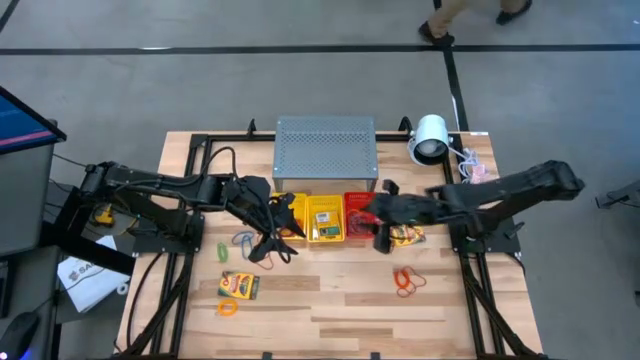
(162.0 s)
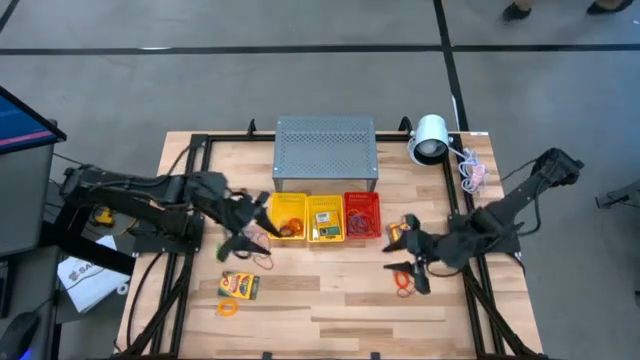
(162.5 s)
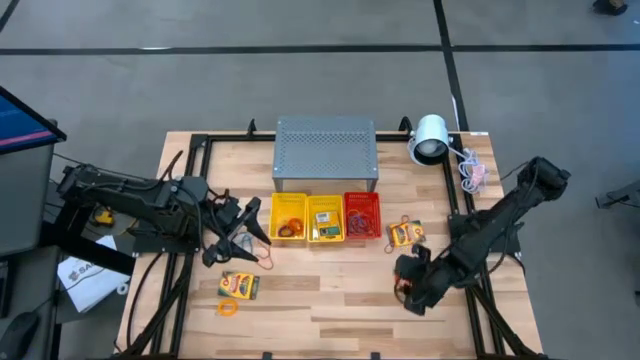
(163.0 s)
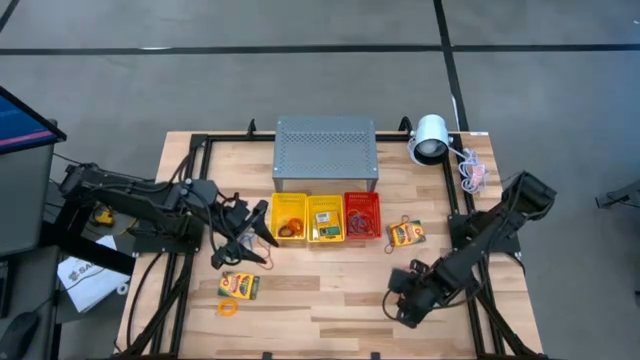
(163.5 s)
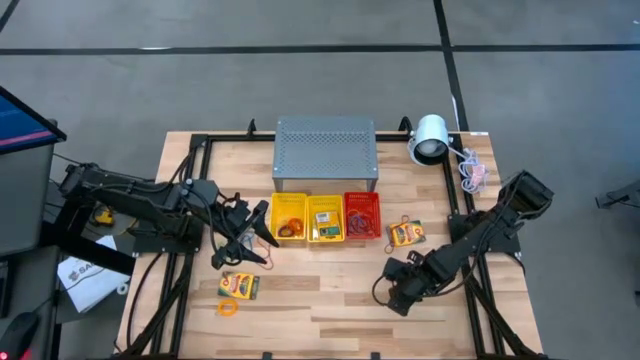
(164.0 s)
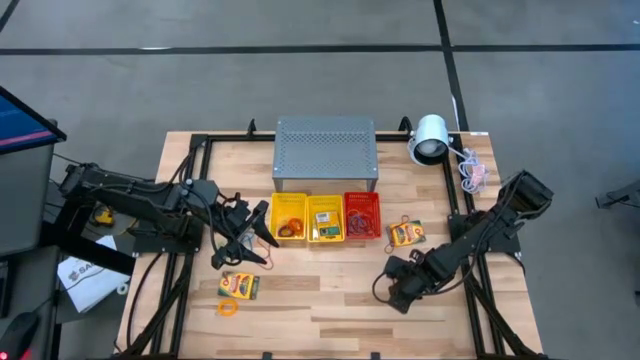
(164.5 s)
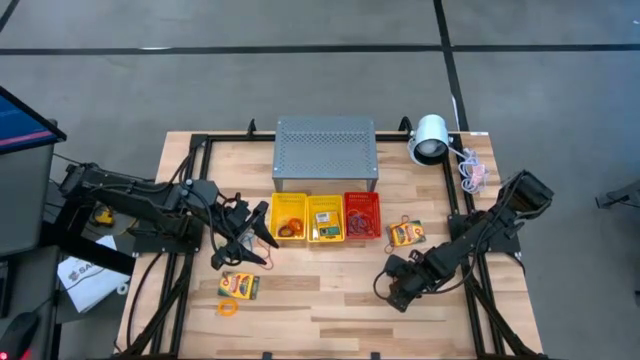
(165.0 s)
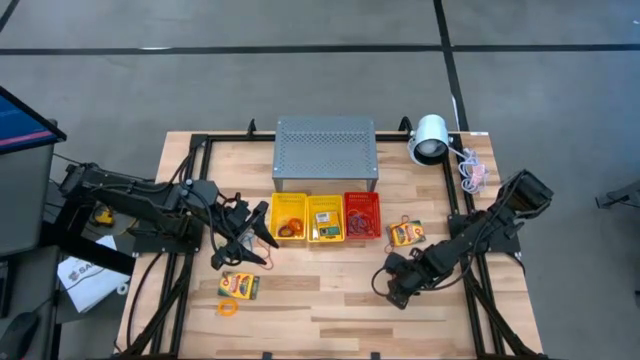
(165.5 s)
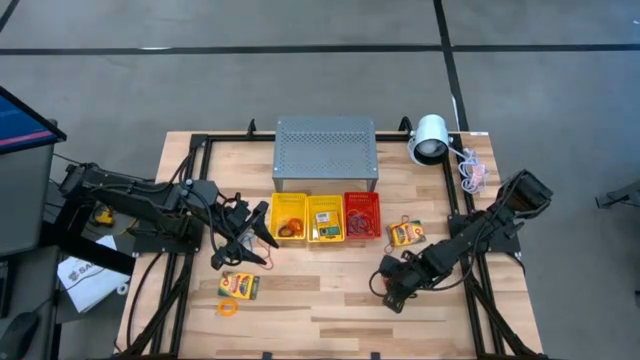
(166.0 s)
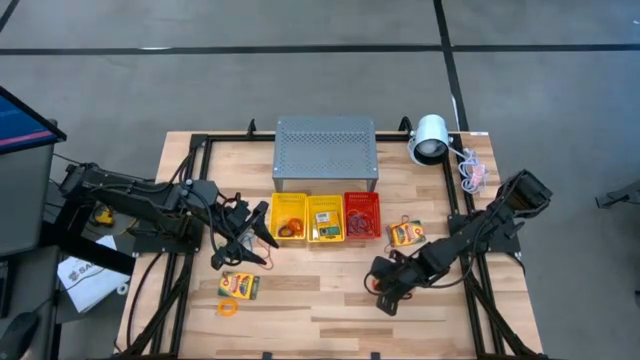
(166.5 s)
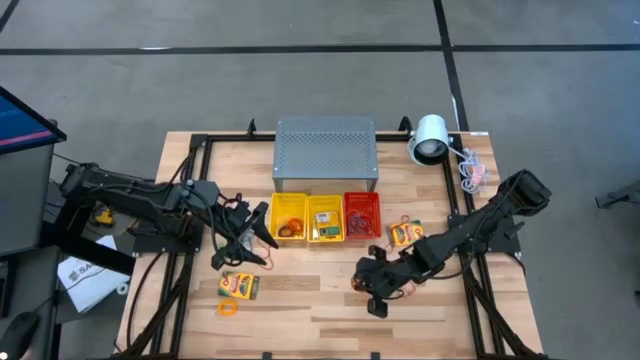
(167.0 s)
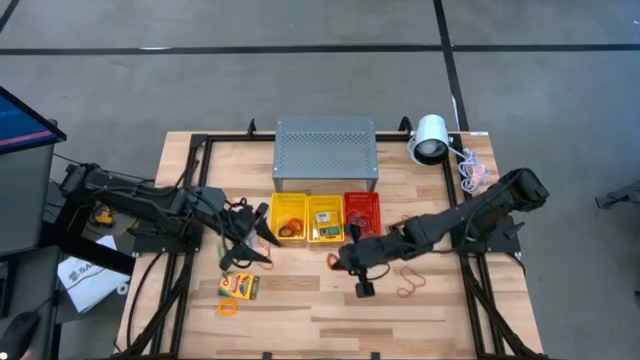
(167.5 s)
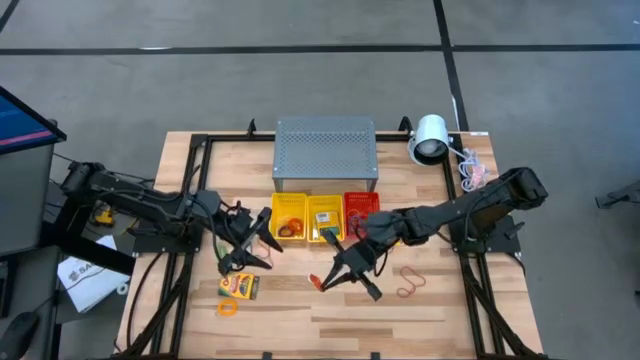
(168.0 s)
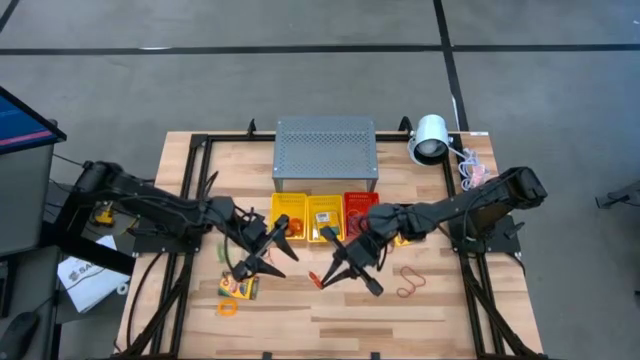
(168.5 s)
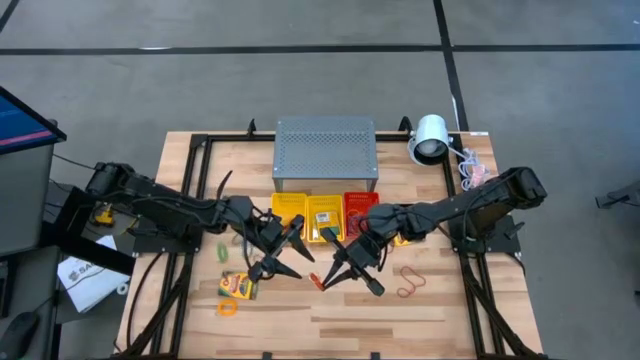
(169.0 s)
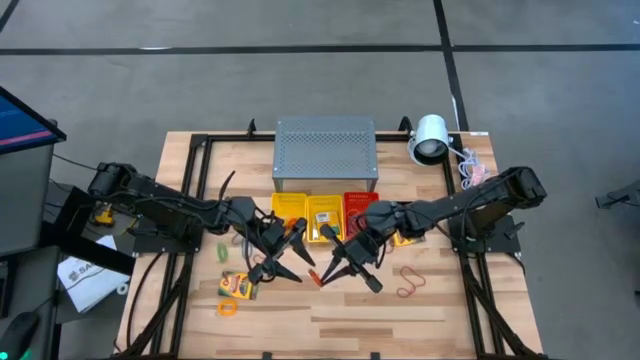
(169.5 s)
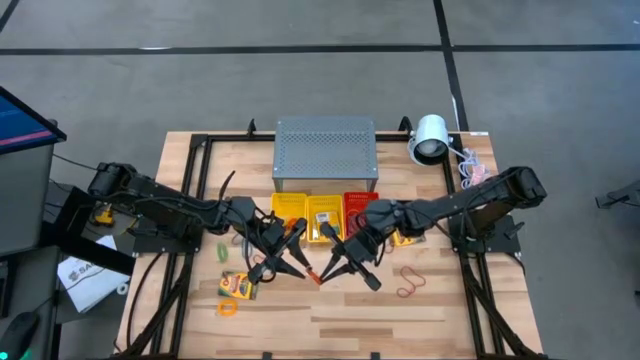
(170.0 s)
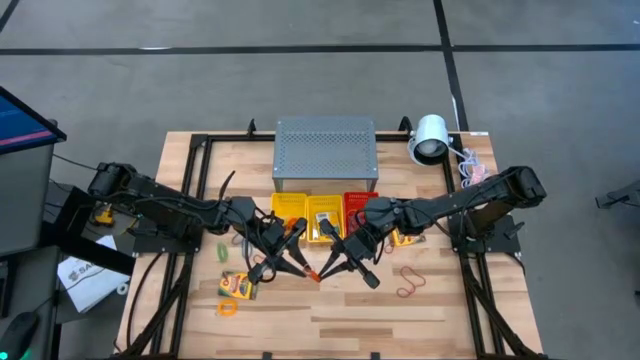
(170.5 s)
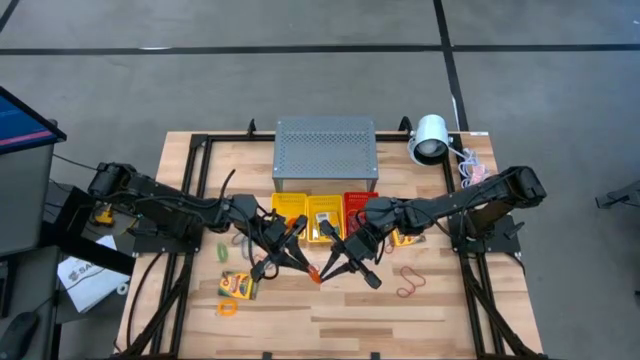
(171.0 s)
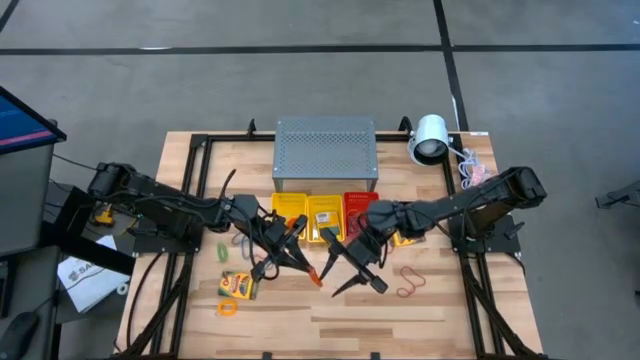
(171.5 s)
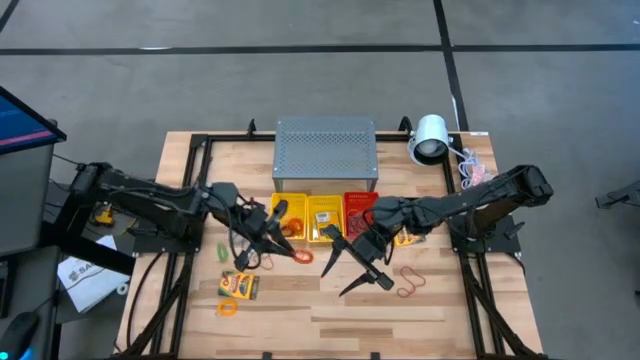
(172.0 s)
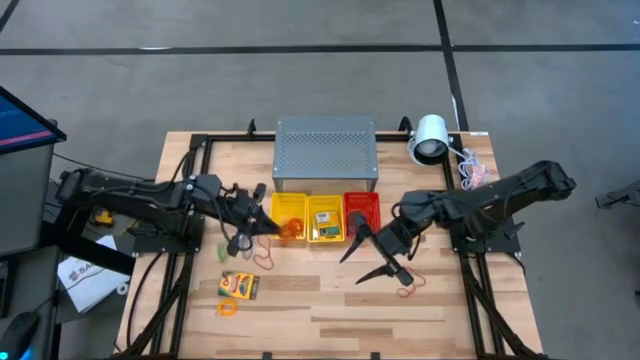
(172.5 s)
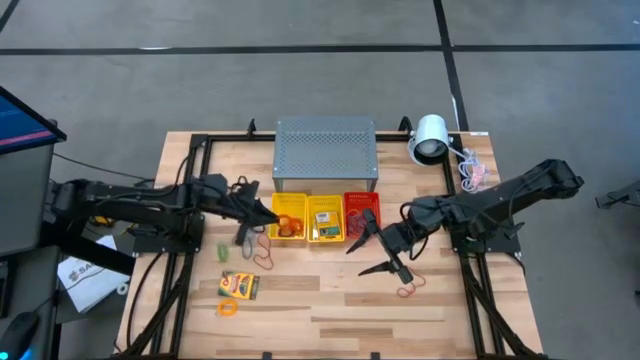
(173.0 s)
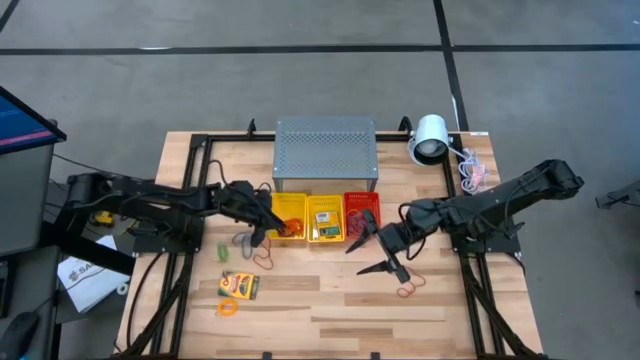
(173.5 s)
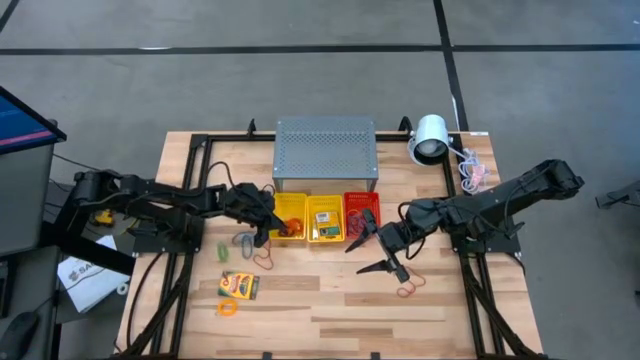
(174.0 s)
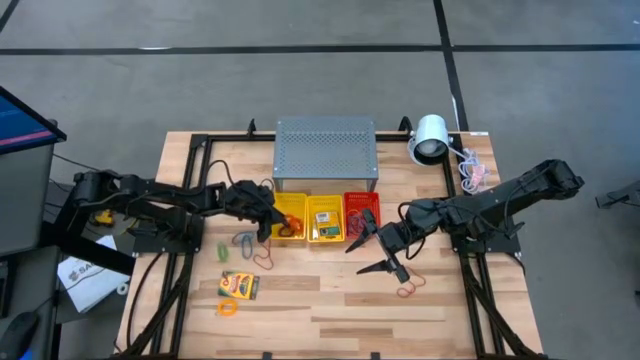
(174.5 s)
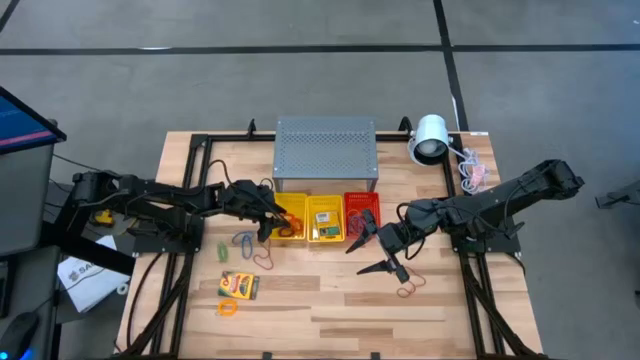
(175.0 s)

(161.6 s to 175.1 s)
Task: Pick & Place Office Desk Supplies
Put the orange spring keychain into the left yellow bin

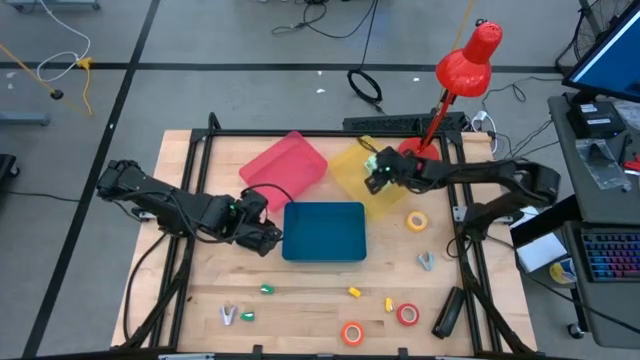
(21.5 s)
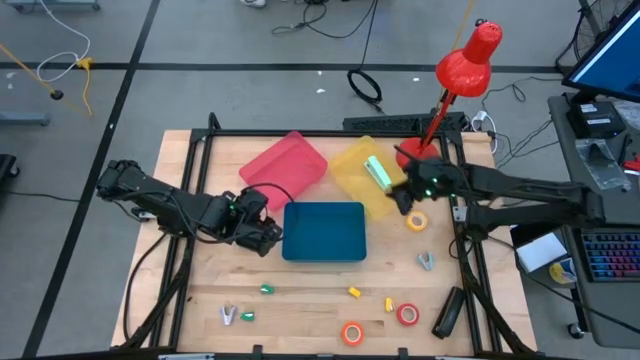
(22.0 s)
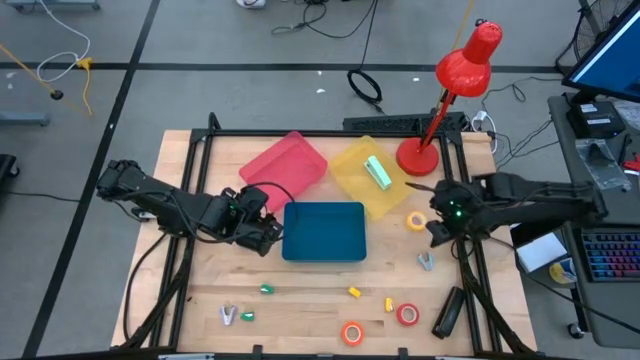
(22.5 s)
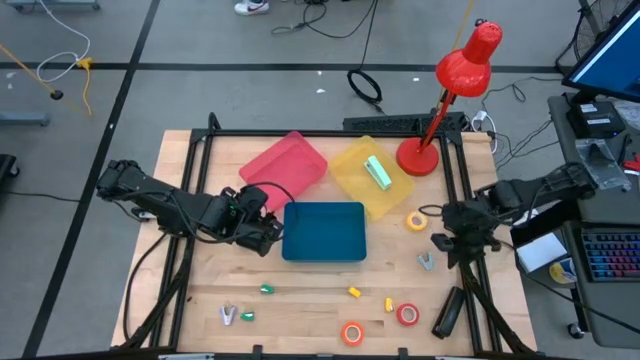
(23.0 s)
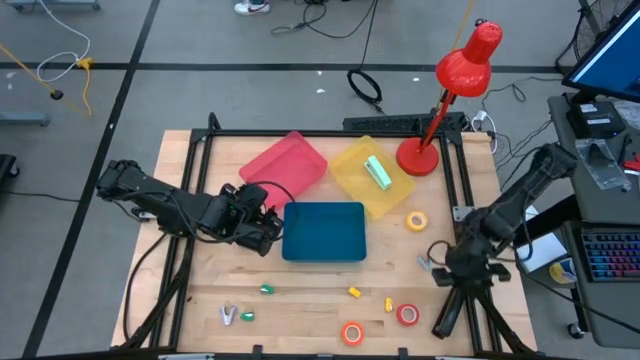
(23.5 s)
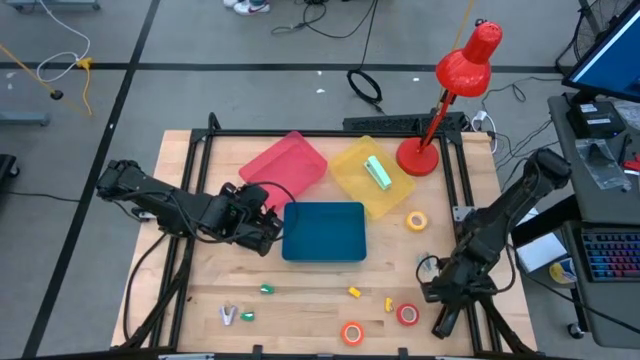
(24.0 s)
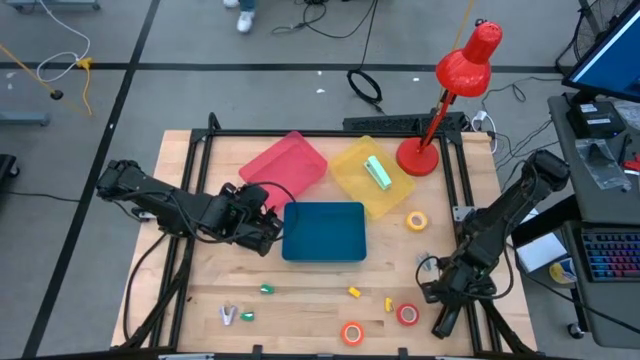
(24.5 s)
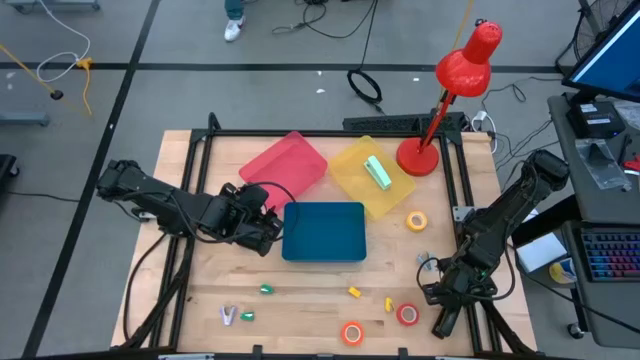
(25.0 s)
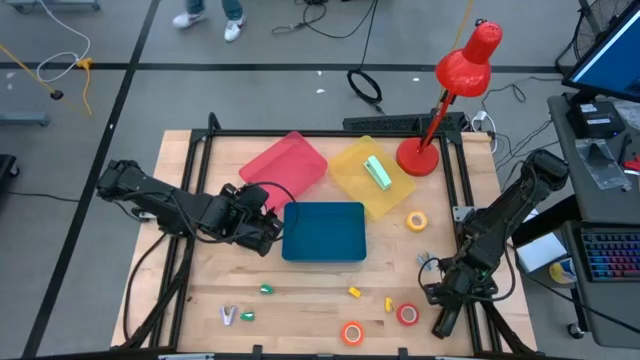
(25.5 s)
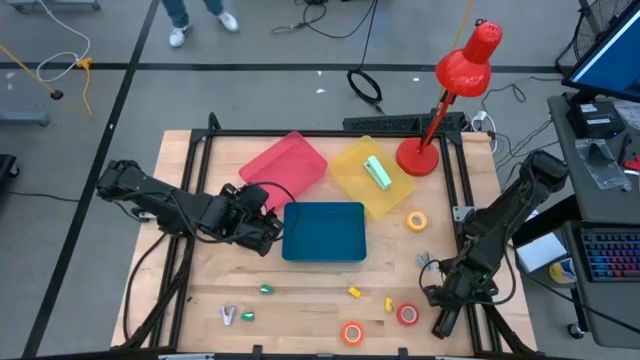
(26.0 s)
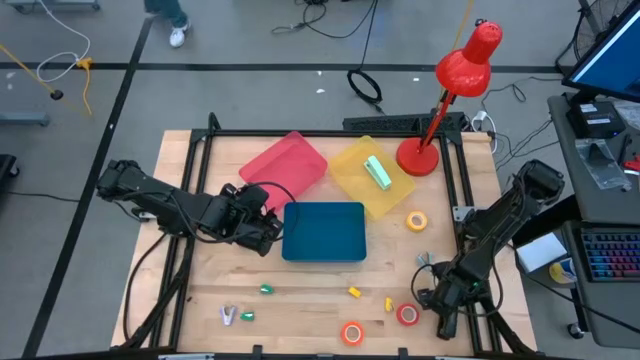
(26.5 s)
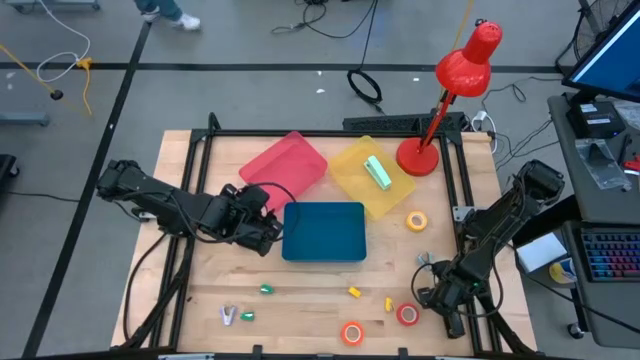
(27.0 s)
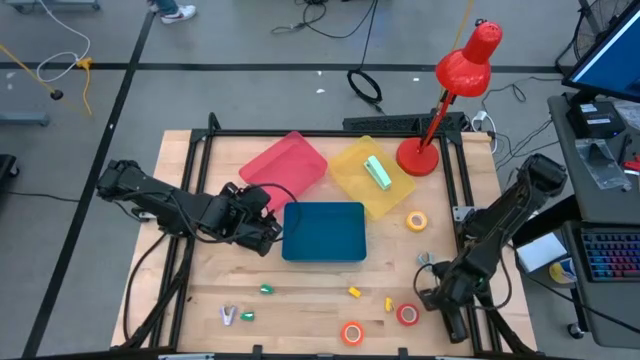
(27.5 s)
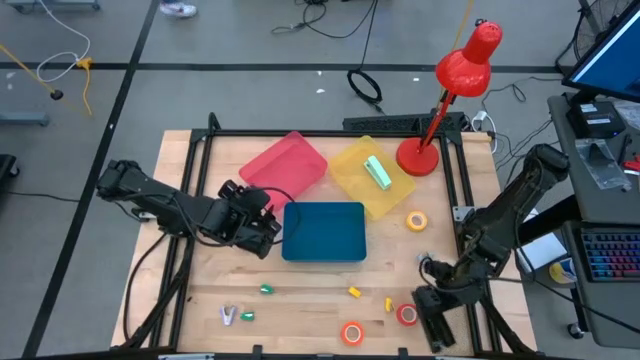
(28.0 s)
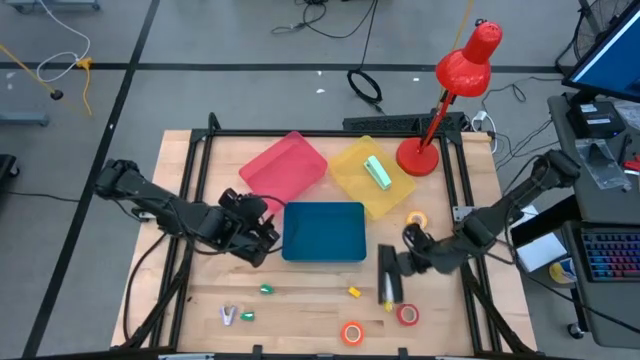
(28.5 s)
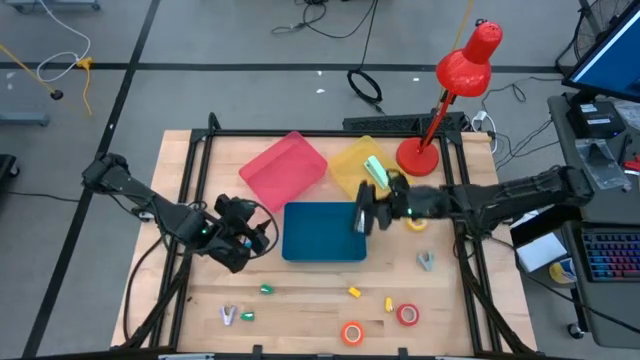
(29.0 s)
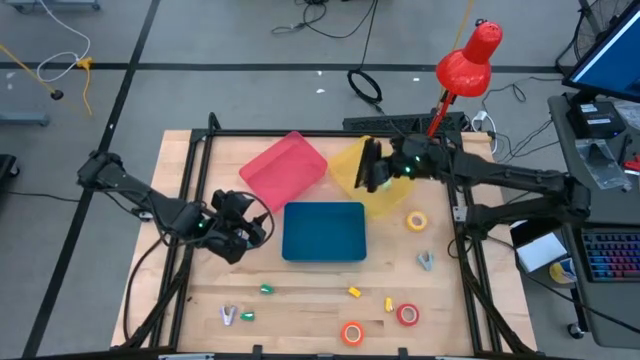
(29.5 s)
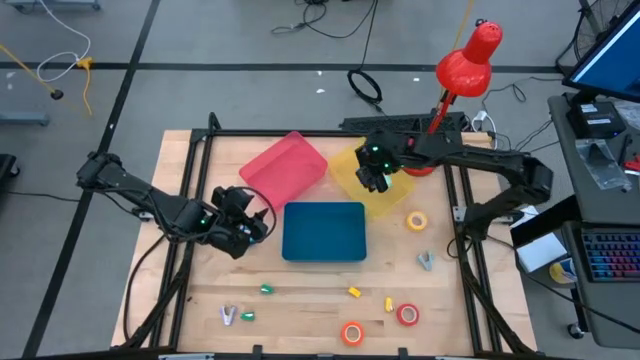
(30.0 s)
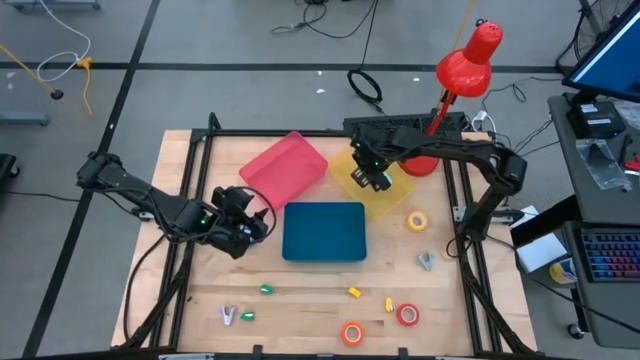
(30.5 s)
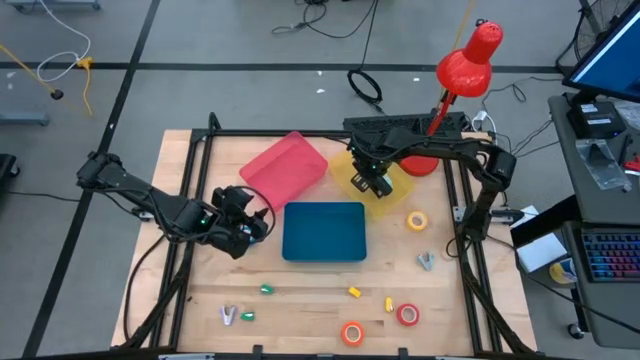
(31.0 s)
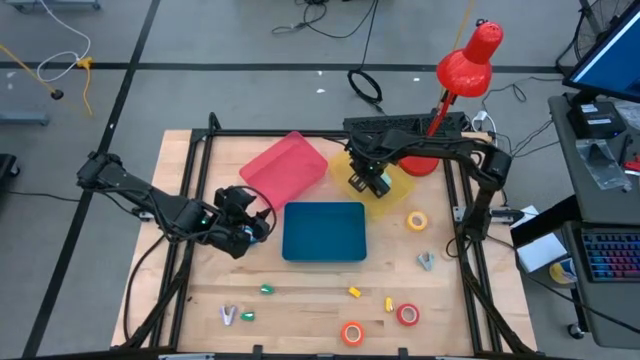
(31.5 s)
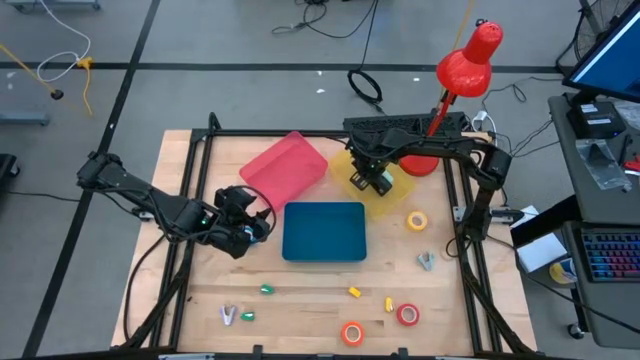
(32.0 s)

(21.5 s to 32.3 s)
Task: Pick and place Stapler, Stapler remover, tape
Put the black stapler into the yellow bin
